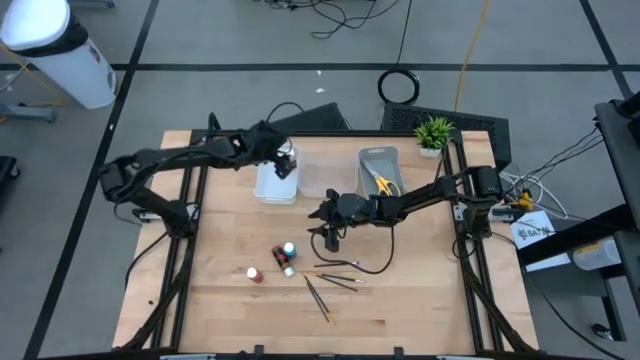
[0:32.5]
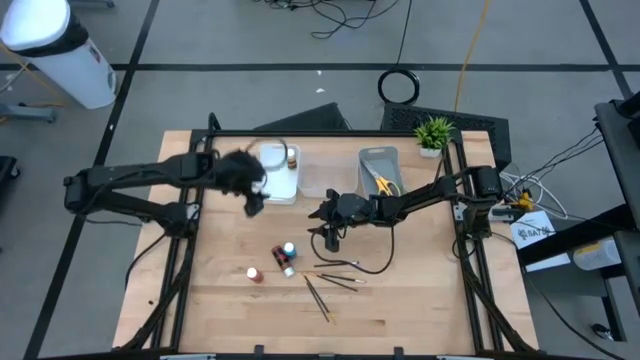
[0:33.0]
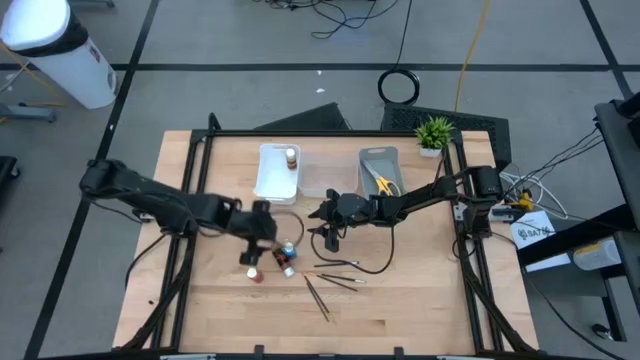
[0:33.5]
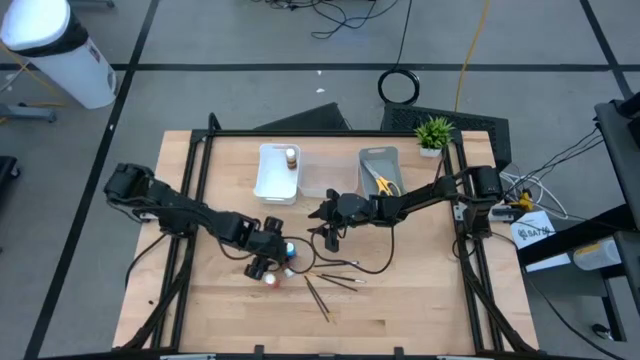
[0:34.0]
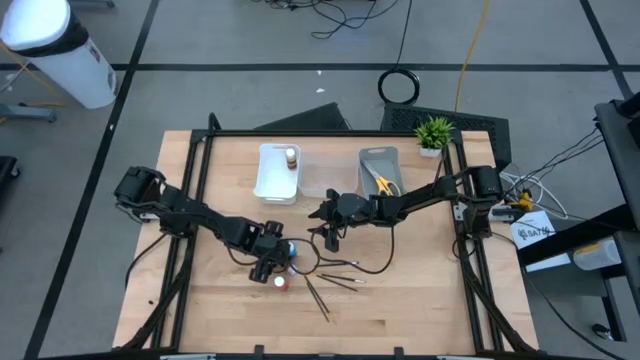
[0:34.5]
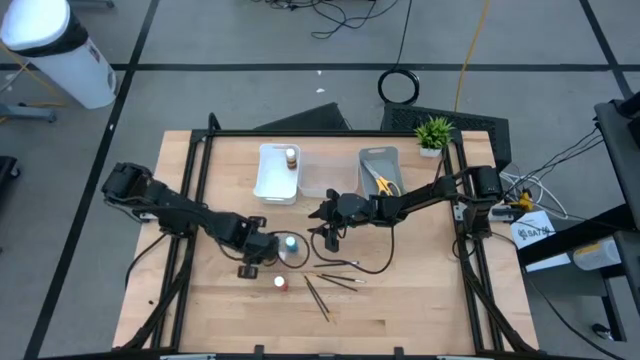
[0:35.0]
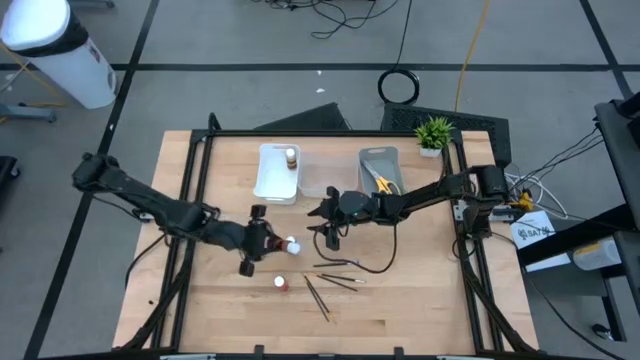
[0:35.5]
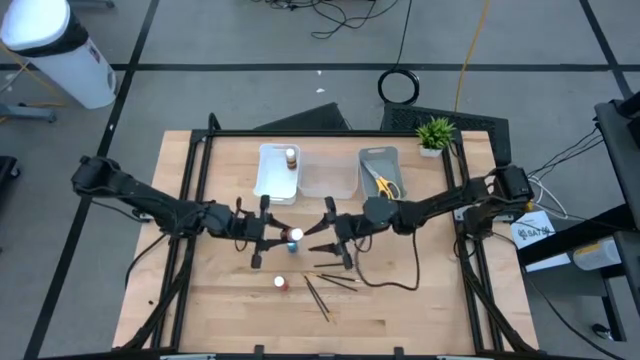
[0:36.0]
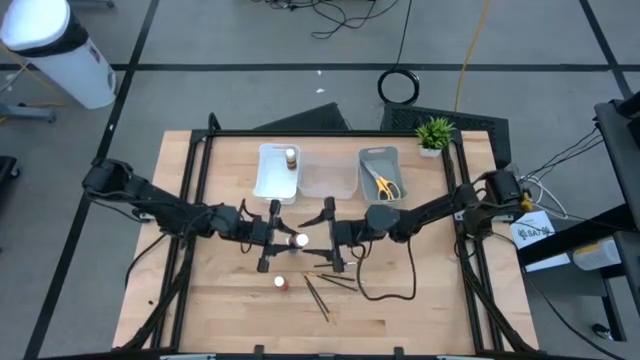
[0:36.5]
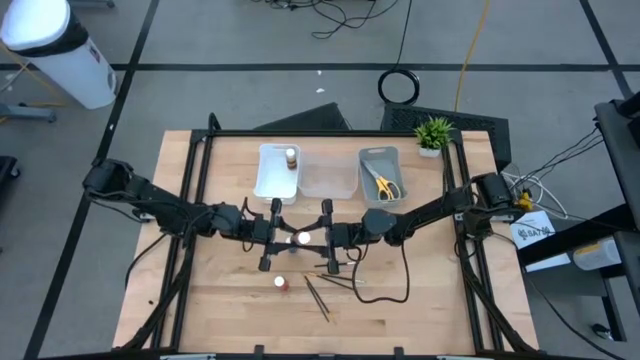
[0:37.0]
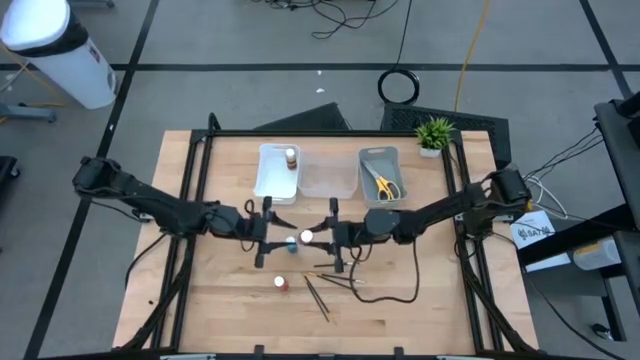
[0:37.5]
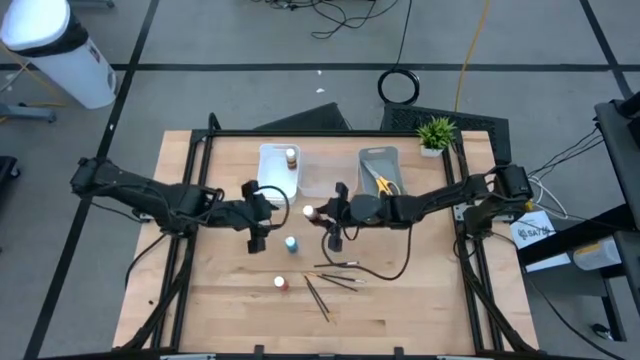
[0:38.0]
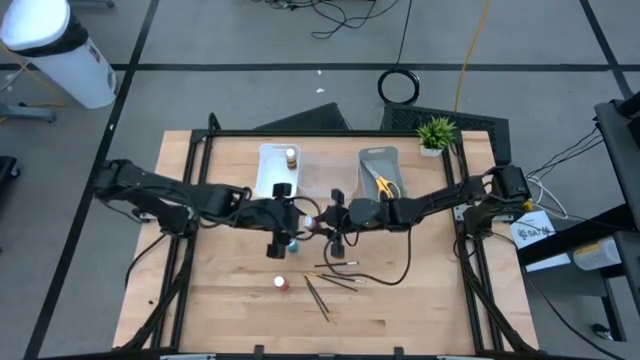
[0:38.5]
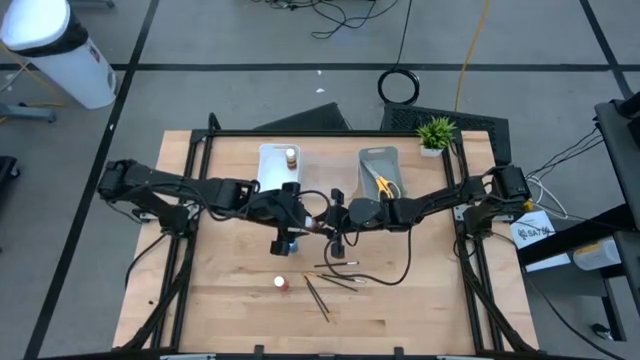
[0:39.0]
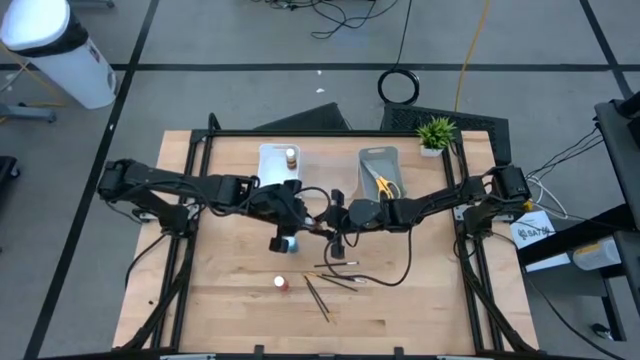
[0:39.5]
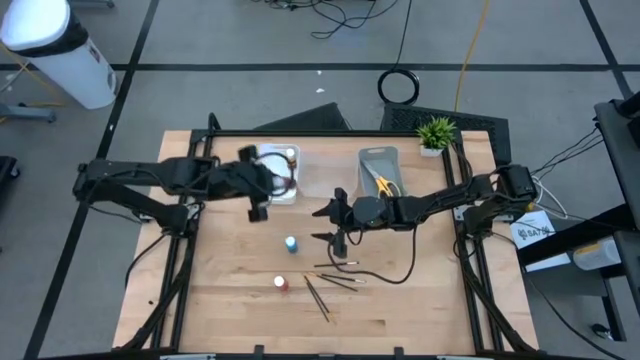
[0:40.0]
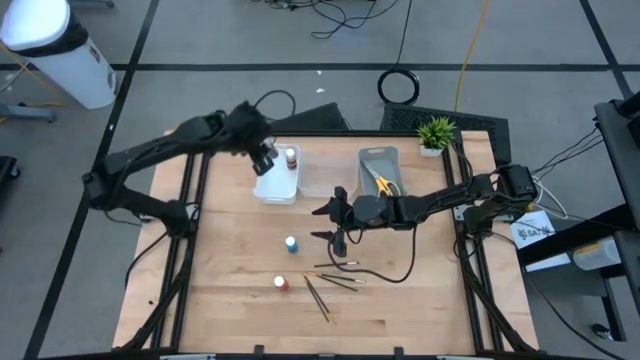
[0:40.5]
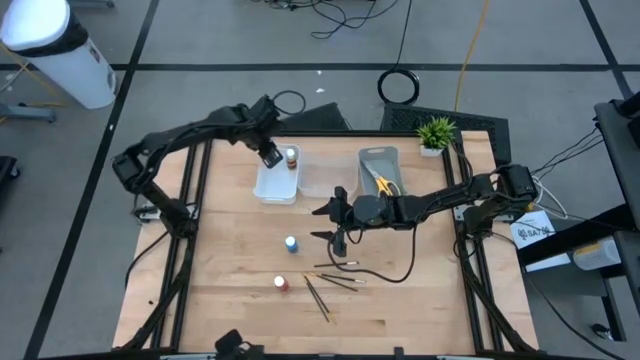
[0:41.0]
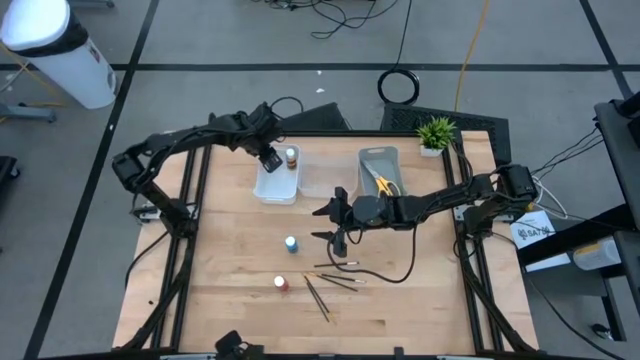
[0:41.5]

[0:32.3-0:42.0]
Task: Pick & Place Paint Supplies
Put the brown paint bottle in the white bin

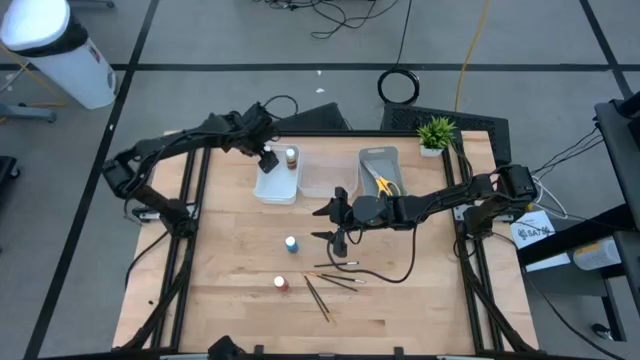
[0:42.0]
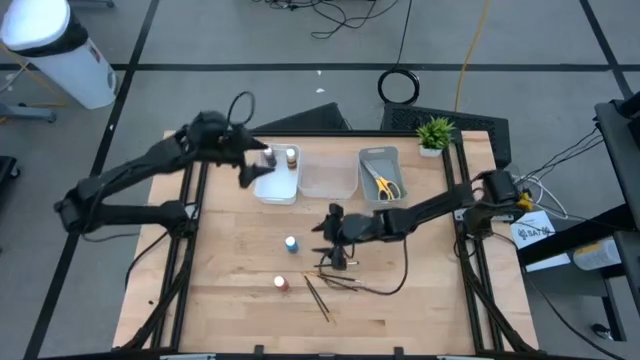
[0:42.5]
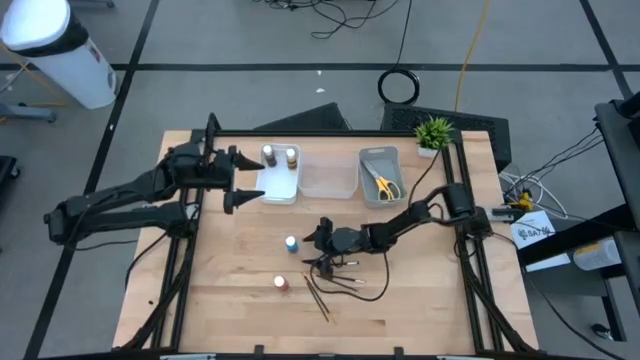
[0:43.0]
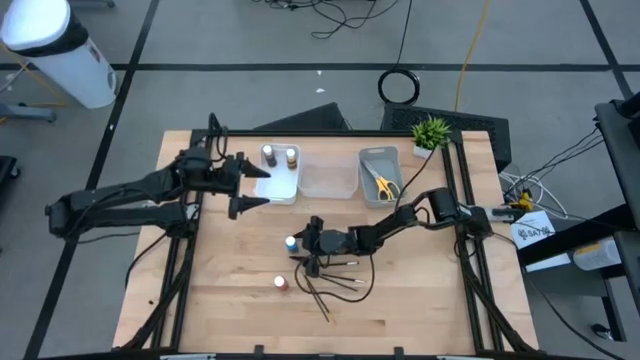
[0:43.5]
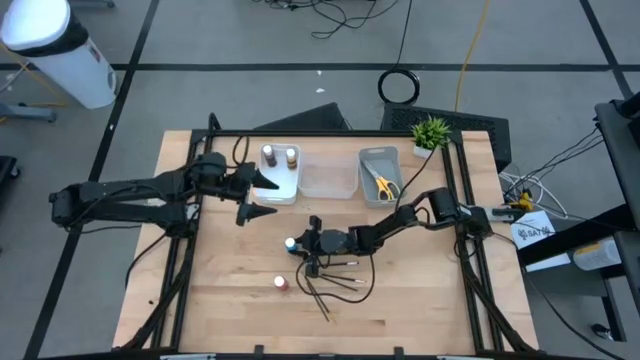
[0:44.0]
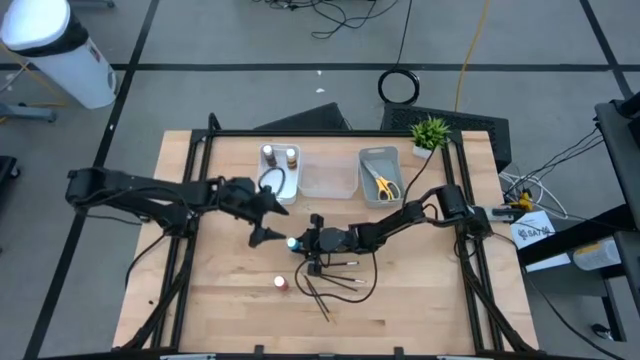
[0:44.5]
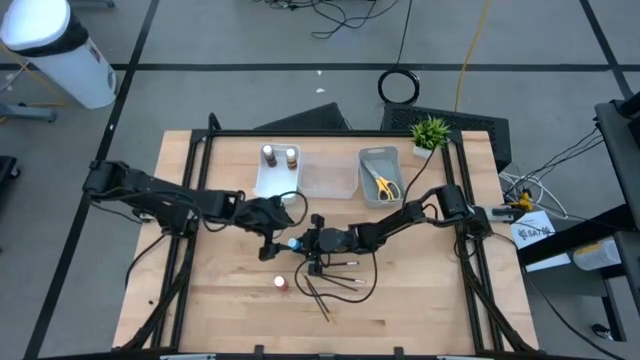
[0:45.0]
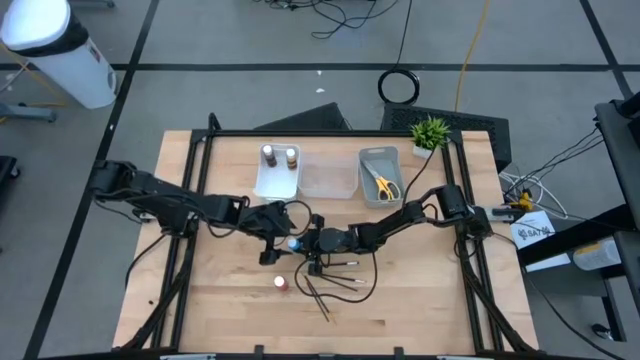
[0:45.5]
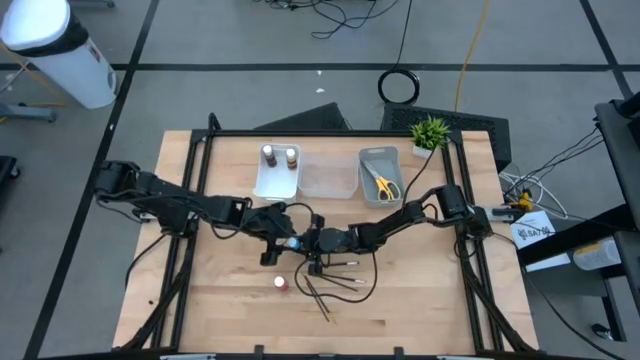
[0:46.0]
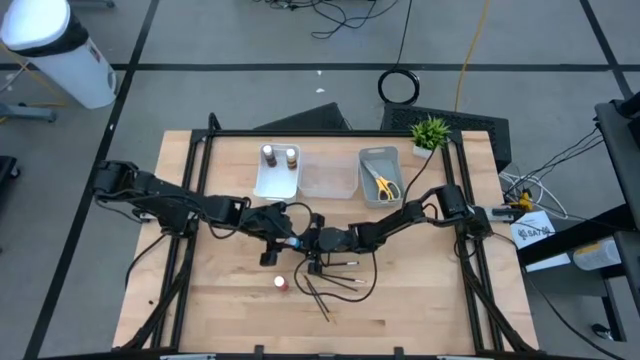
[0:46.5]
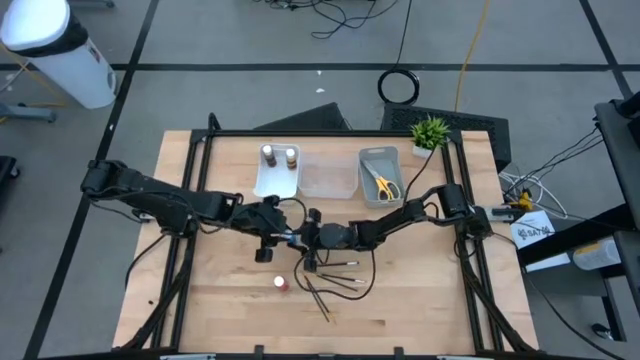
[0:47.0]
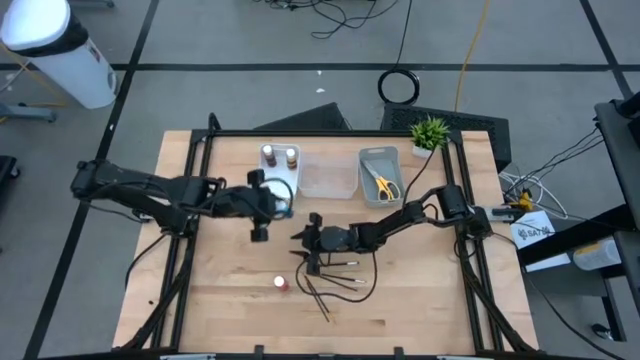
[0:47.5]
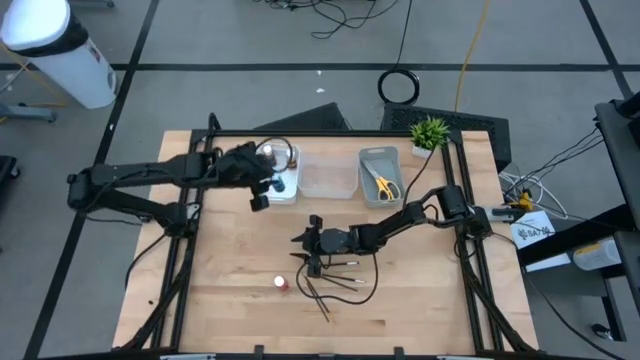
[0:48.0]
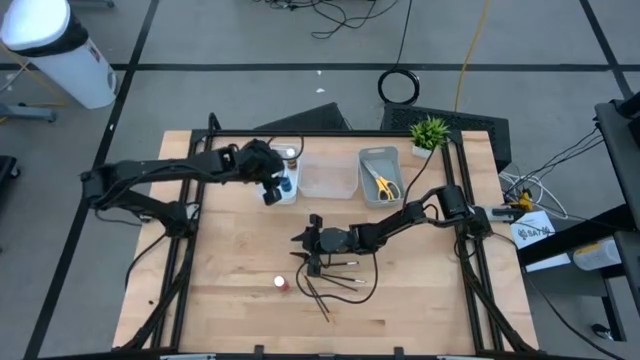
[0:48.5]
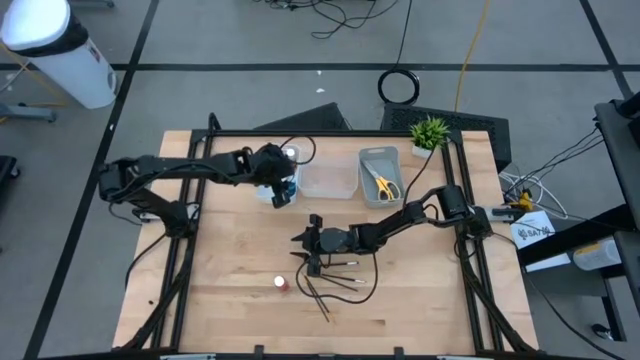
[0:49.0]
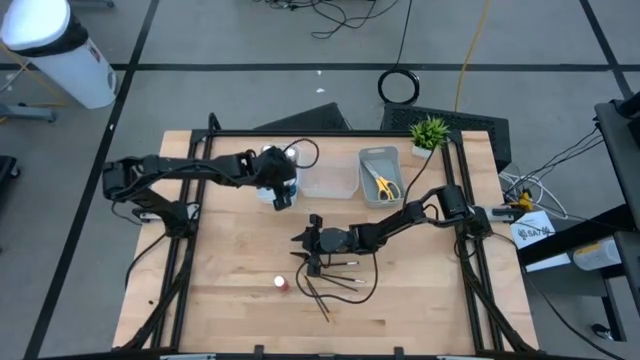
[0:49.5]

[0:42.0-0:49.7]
Put the blue paint bottle in the white bin

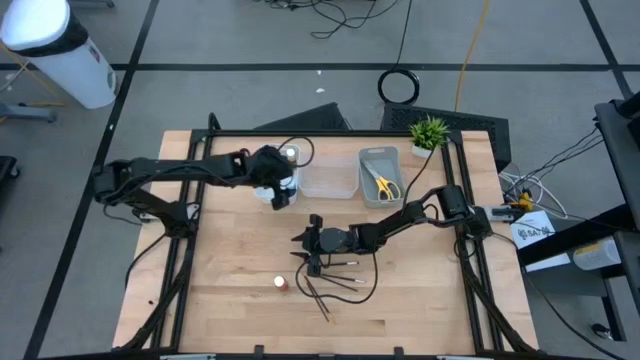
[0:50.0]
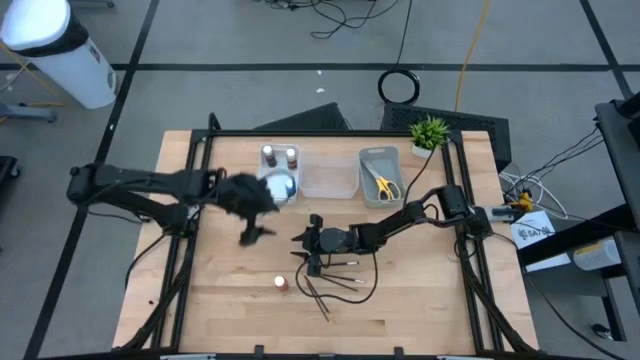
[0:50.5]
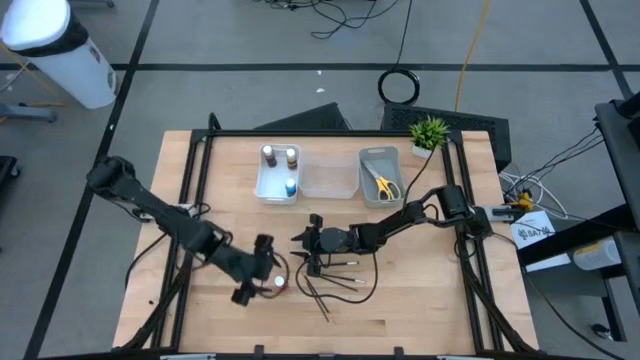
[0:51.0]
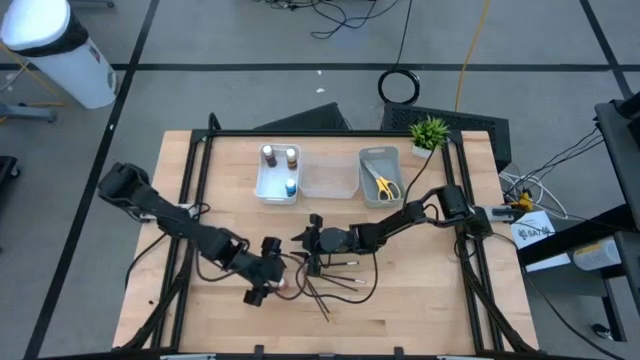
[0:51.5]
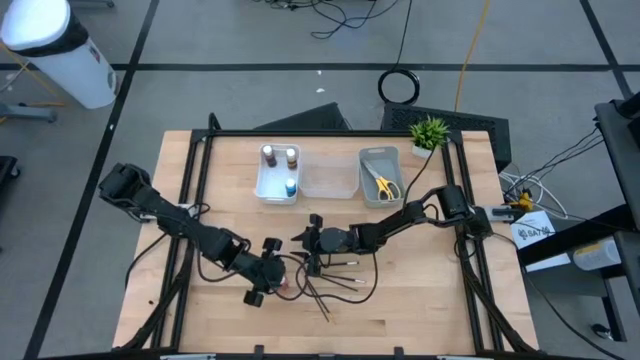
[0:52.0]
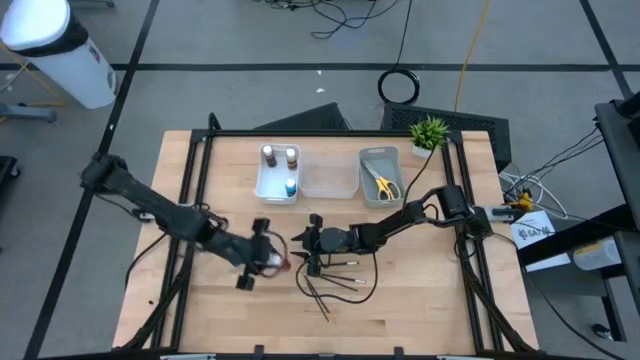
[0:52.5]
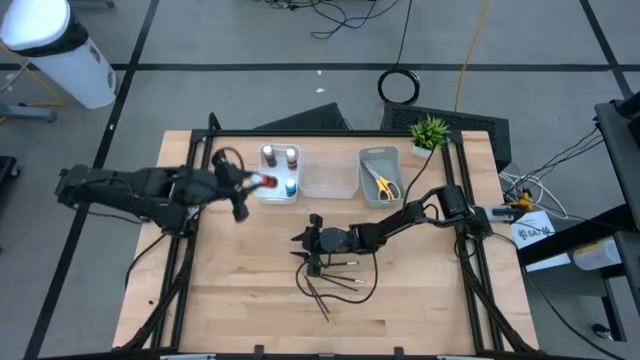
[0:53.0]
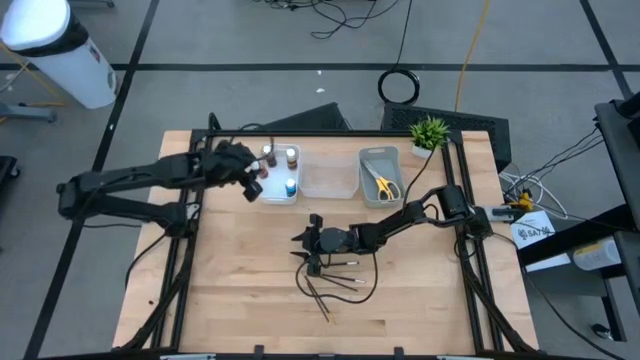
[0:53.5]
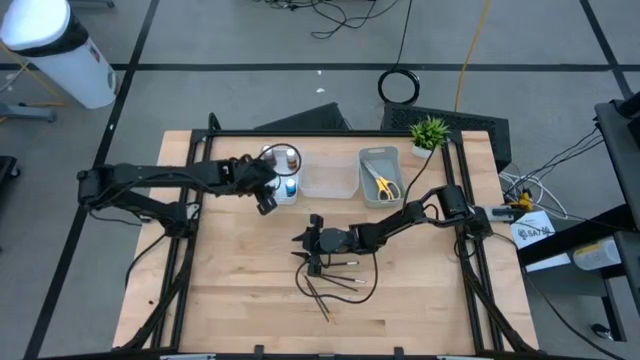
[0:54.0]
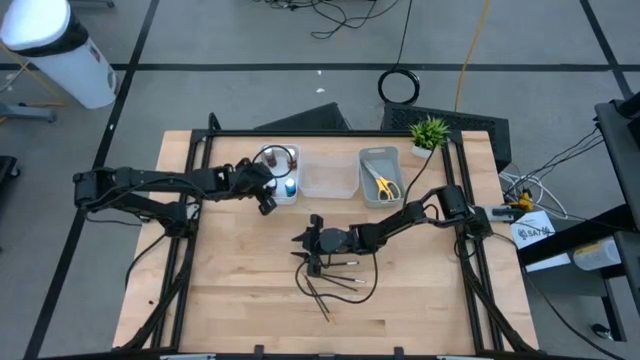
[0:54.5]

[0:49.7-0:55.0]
Put the orange paint bottle in the white bin
